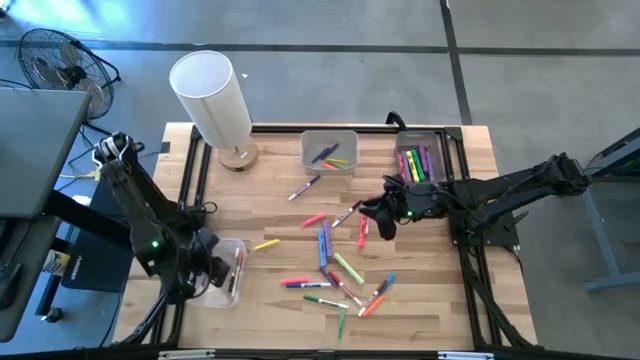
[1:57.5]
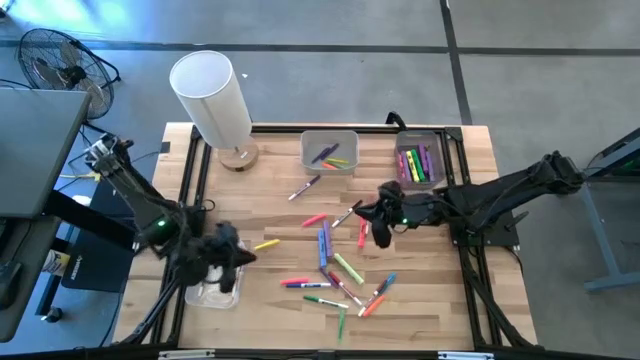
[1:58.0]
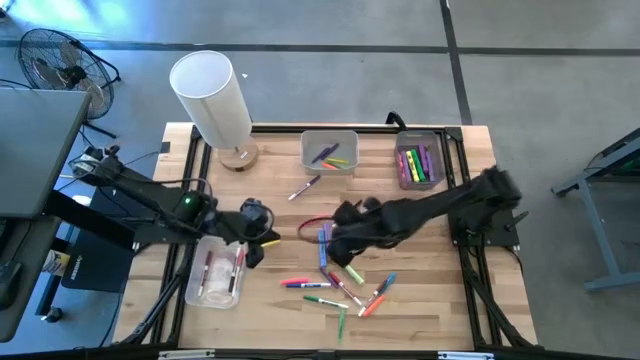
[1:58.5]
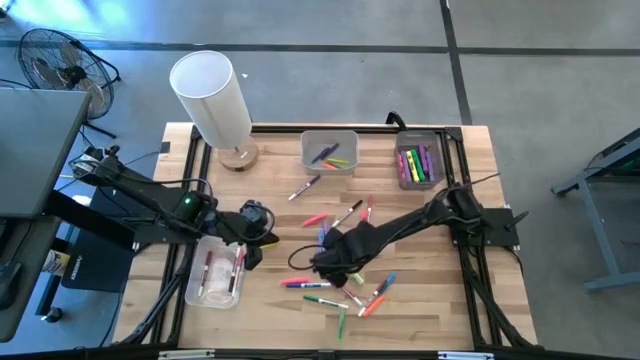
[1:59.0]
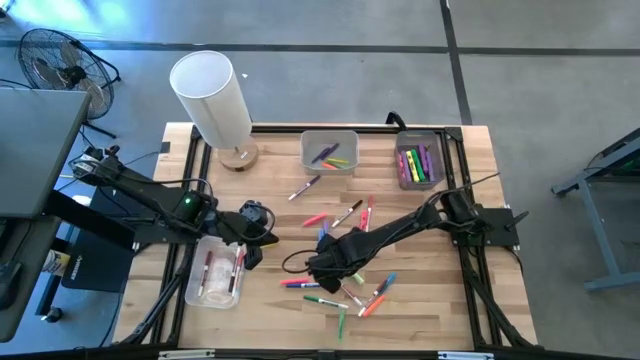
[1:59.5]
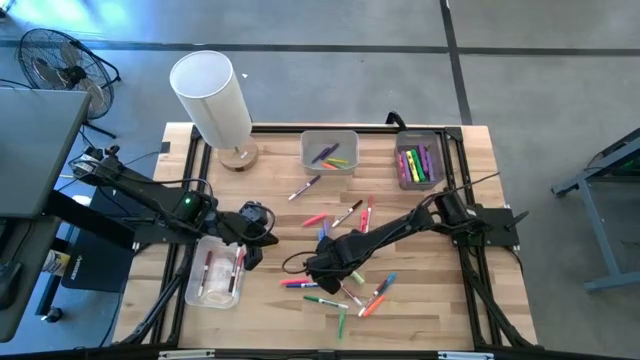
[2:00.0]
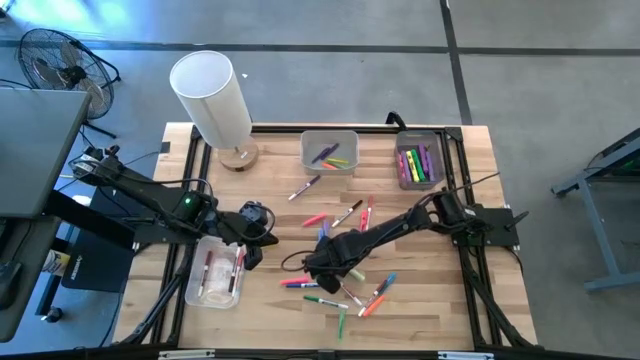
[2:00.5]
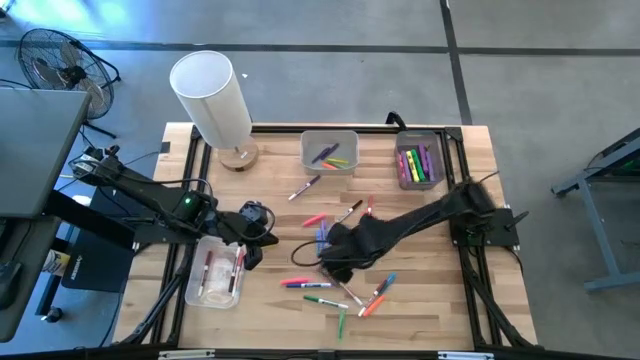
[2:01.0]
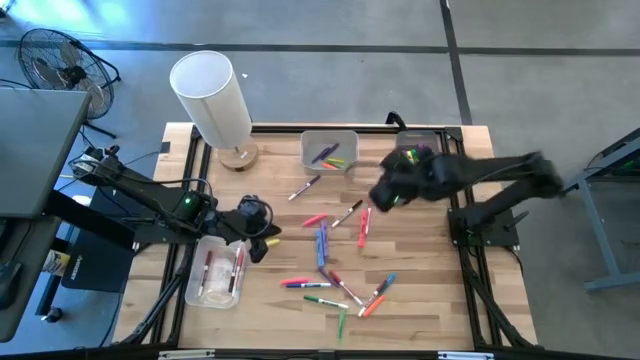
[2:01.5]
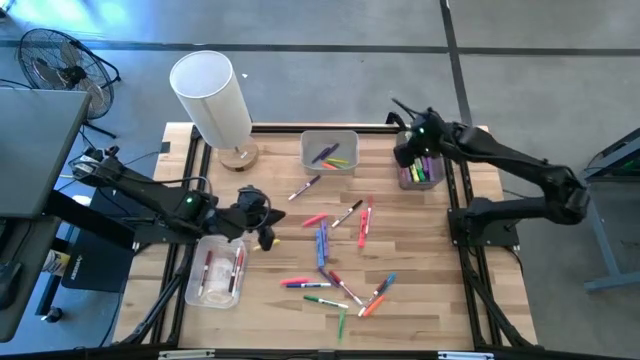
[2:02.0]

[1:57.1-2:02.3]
Task: Pick & Place Markers
Put the light green highlighter pen into the black bin

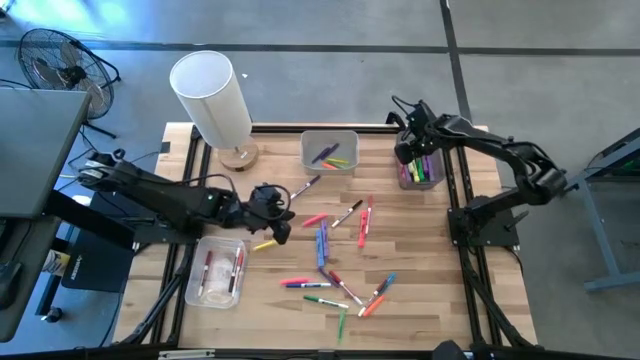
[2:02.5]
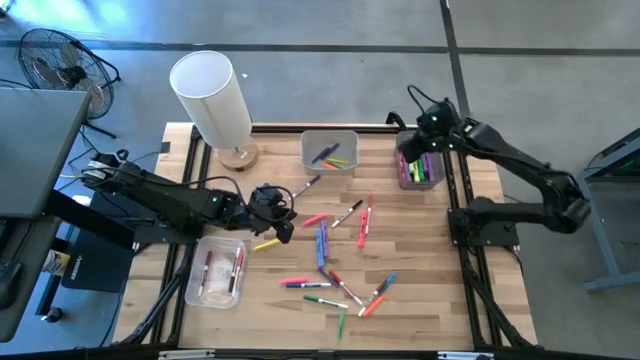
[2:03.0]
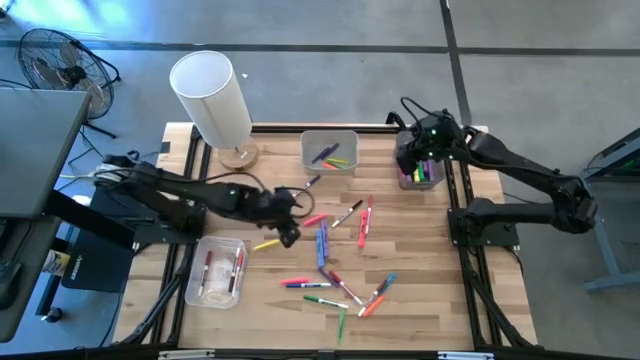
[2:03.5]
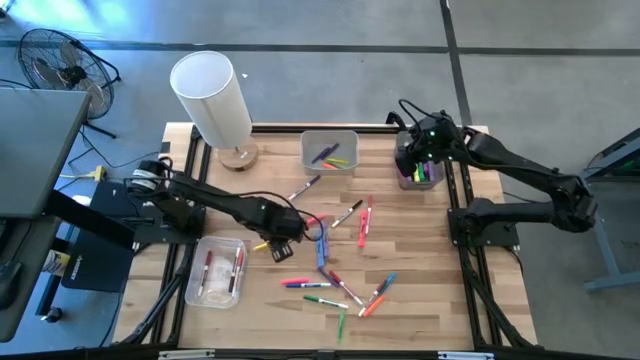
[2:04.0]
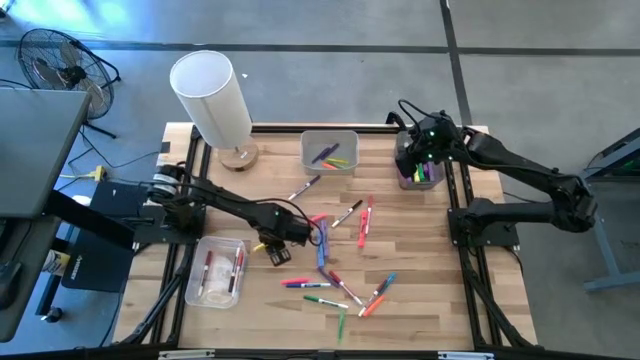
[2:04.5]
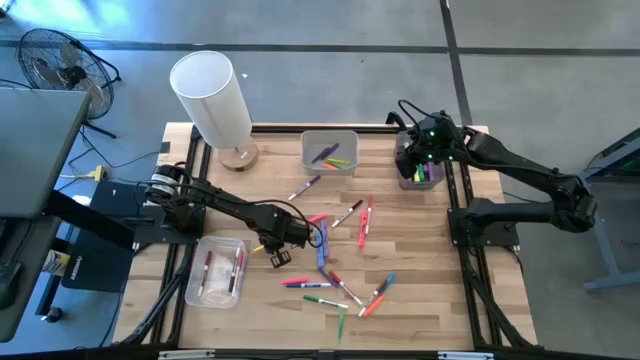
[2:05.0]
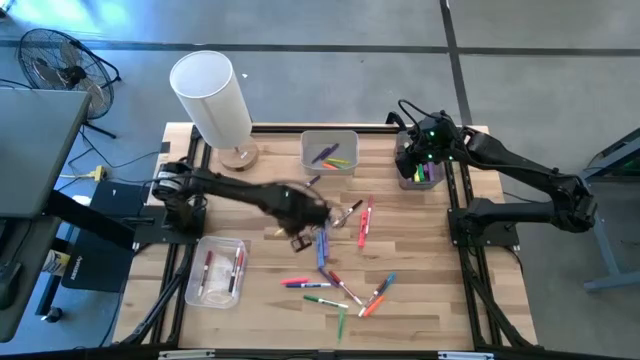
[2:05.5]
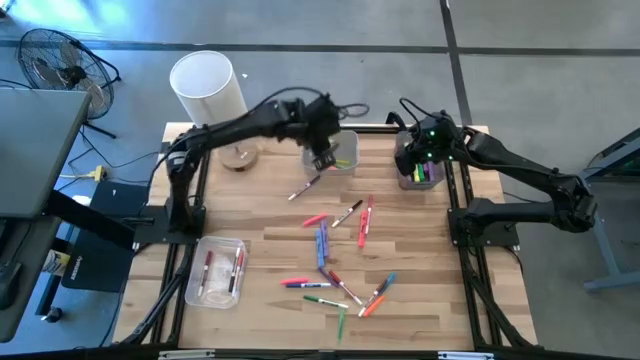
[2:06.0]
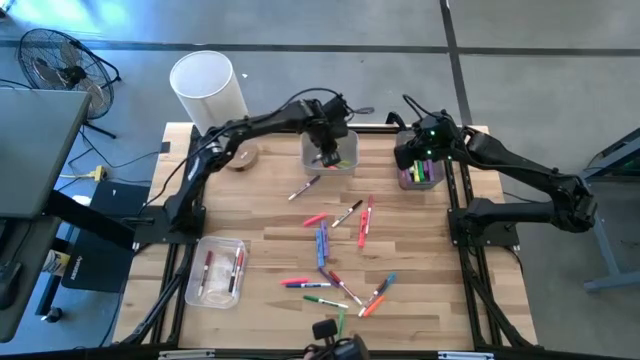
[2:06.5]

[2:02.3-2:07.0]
Put the yellow pen into the white bin

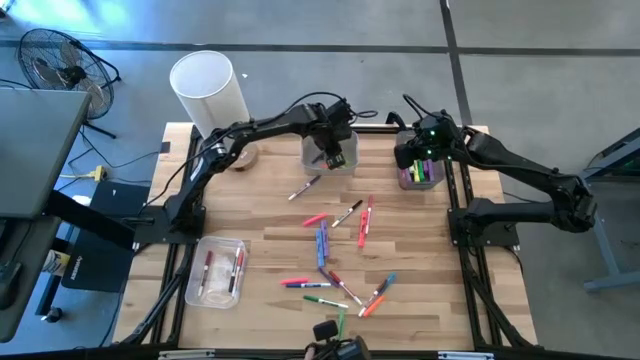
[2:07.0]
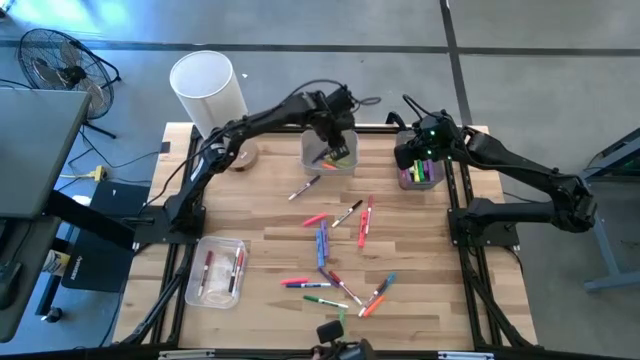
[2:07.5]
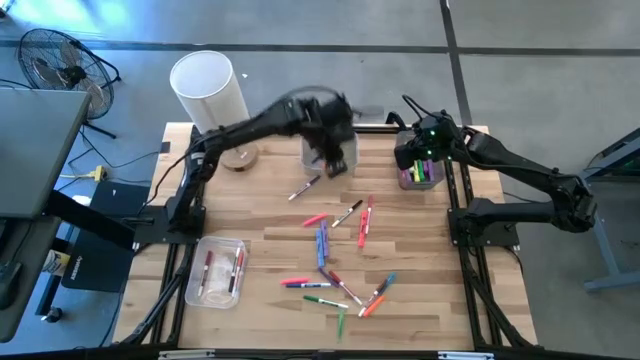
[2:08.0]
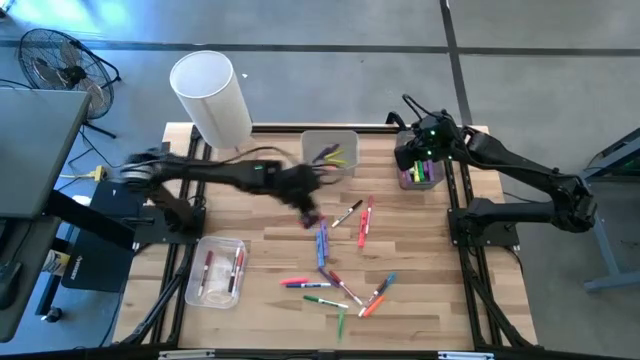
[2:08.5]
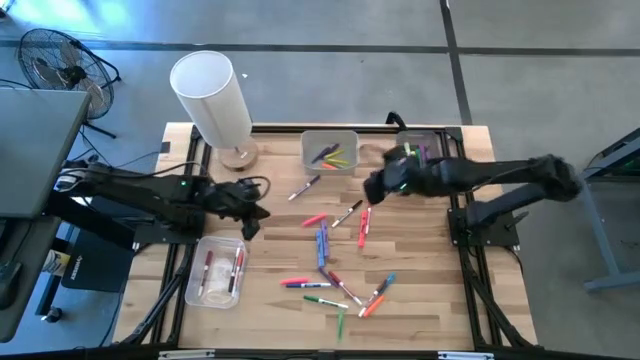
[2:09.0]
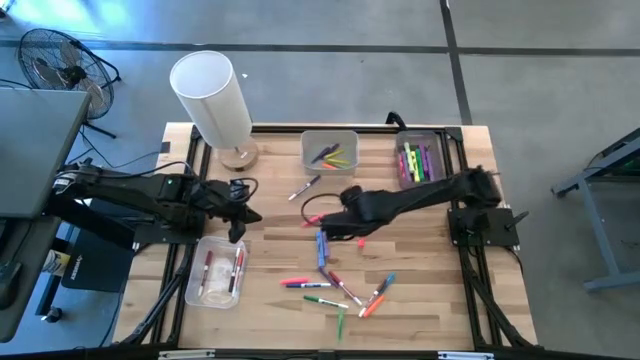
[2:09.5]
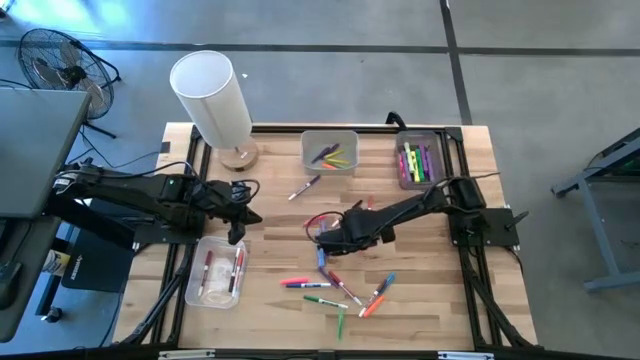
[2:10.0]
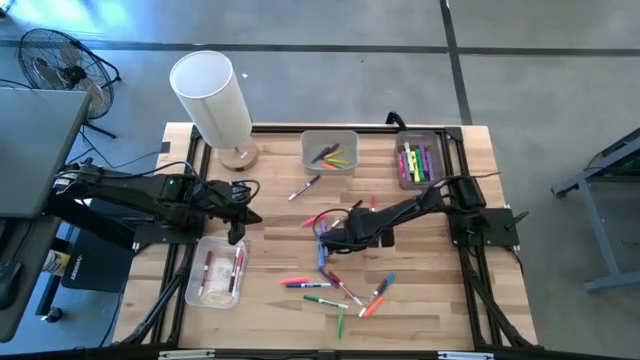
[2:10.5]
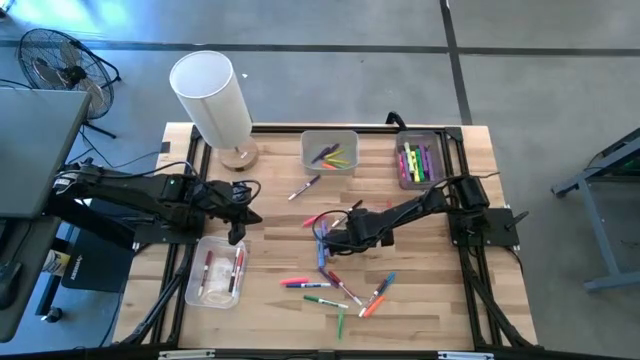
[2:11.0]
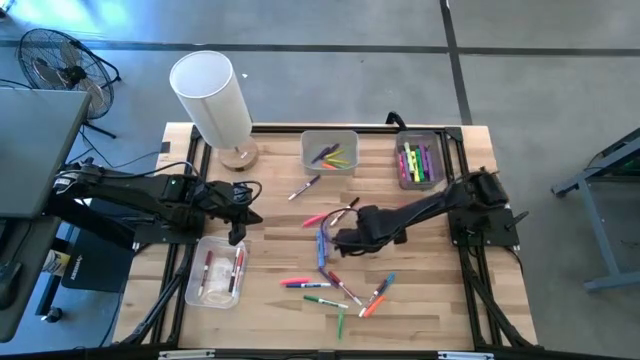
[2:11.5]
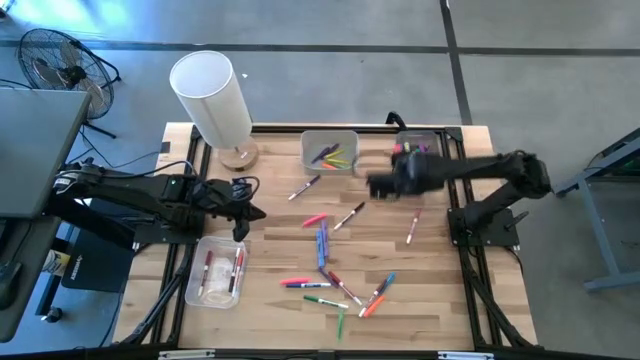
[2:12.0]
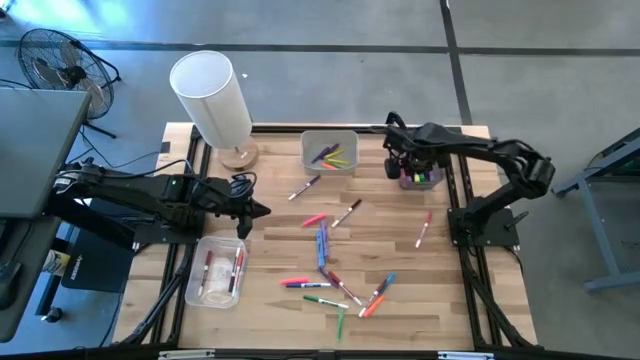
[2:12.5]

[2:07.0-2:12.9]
Put the pink highlighter pen into the black bin

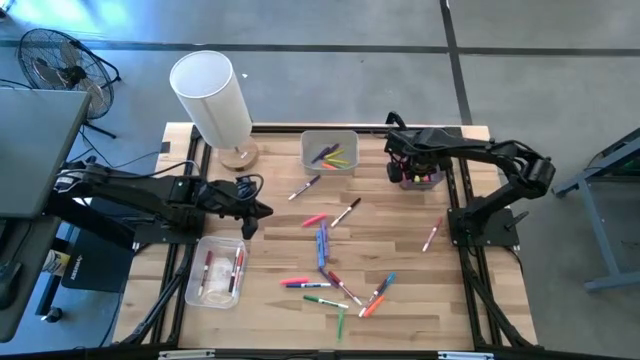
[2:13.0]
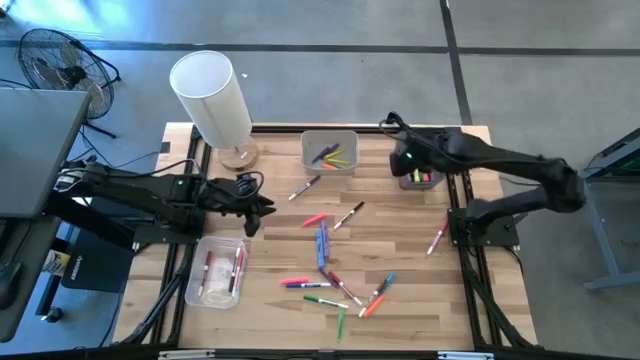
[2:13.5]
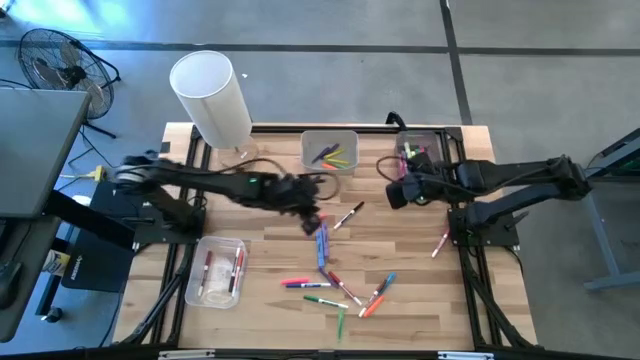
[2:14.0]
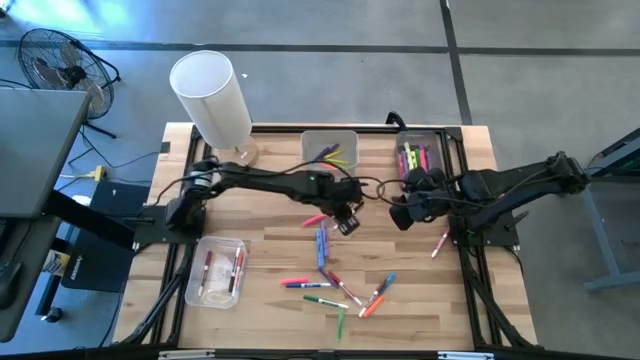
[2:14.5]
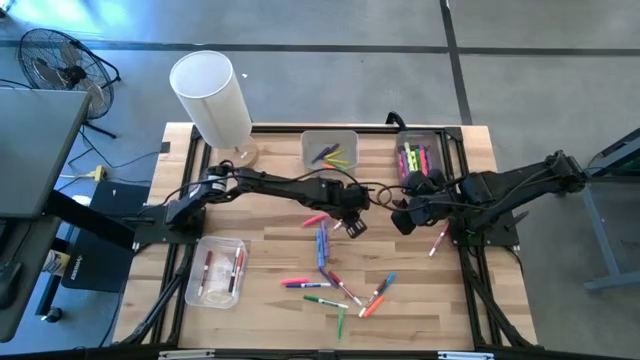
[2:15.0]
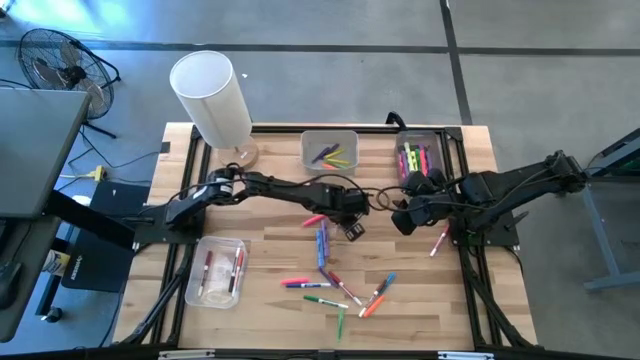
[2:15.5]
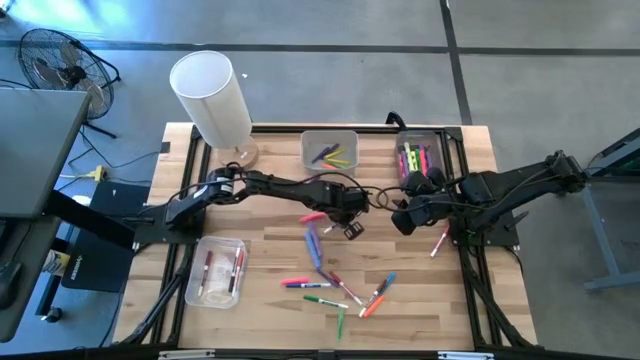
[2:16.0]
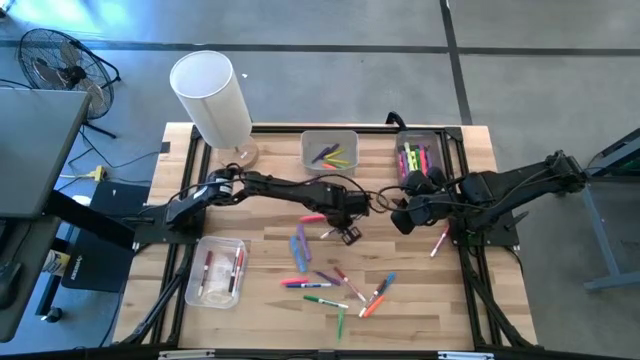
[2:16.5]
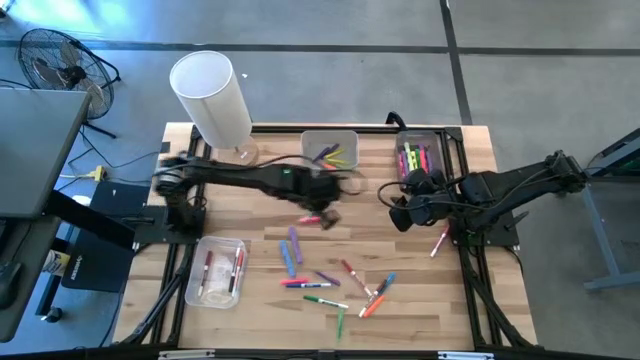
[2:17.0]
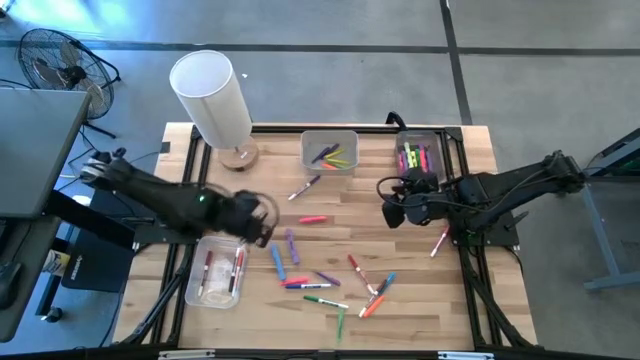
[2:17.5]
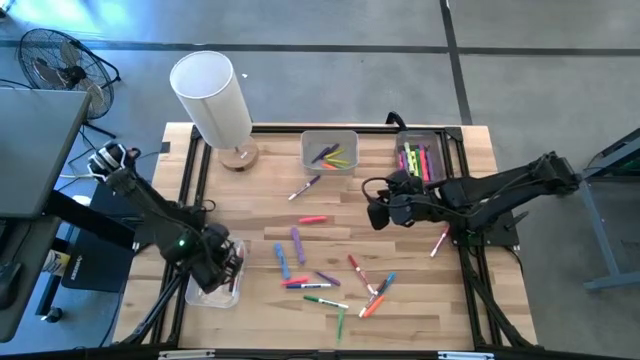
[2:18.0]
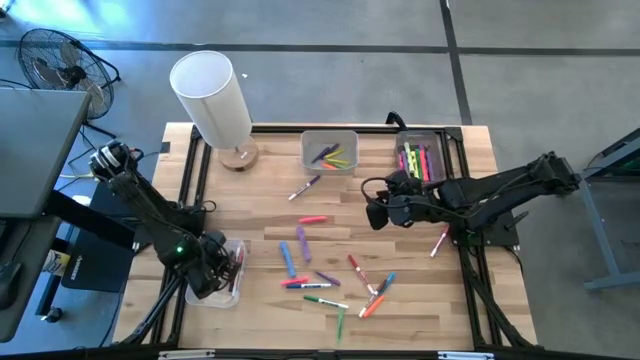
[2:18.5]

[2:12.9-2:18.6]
Put the black marker pen into the transparent bin
